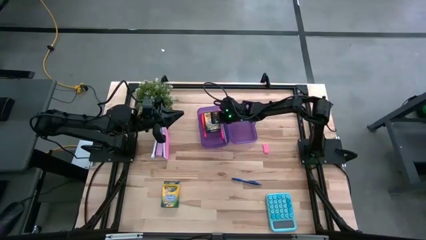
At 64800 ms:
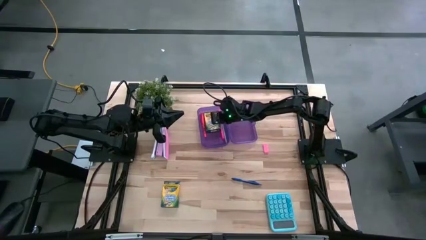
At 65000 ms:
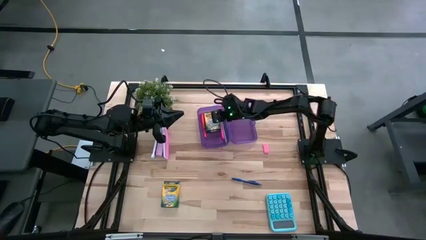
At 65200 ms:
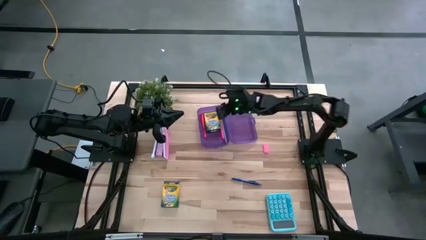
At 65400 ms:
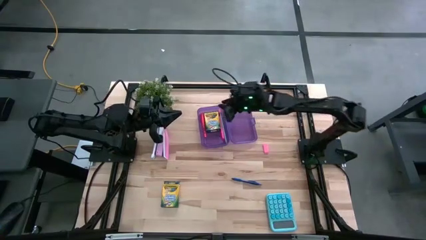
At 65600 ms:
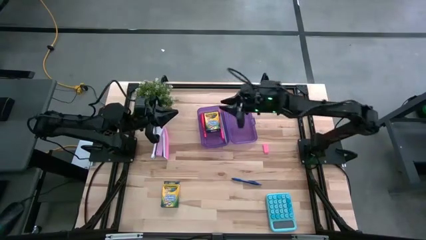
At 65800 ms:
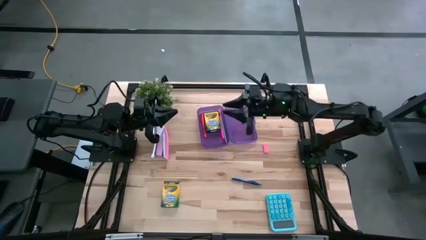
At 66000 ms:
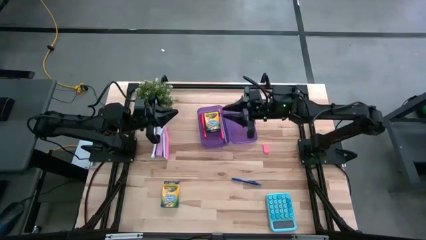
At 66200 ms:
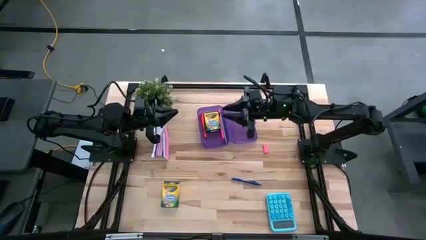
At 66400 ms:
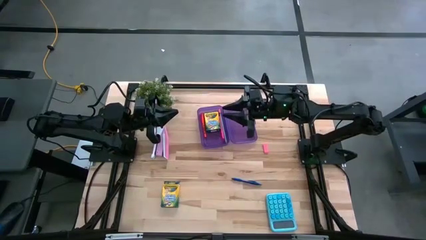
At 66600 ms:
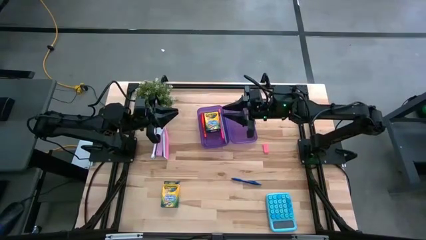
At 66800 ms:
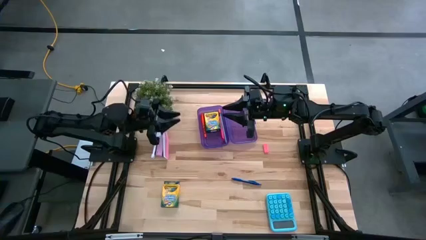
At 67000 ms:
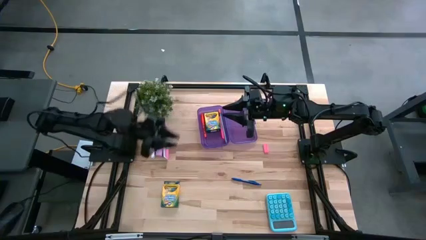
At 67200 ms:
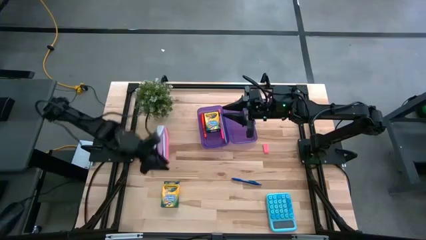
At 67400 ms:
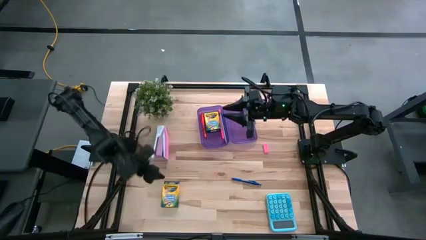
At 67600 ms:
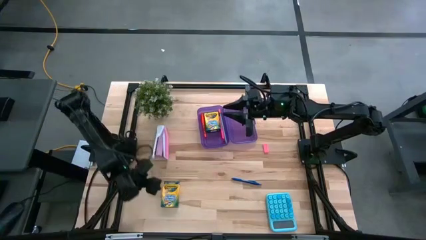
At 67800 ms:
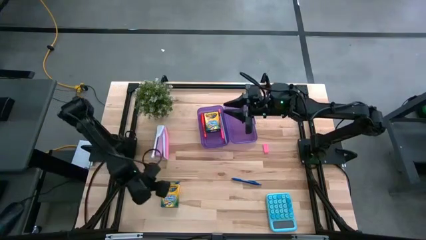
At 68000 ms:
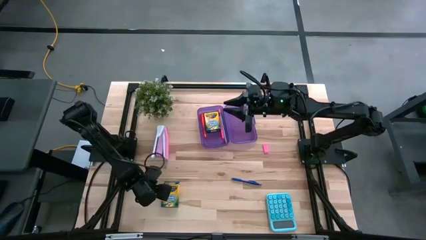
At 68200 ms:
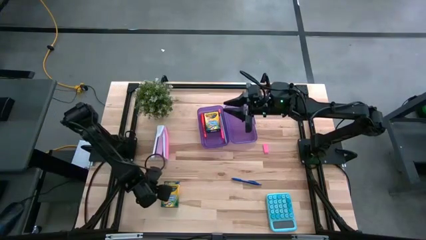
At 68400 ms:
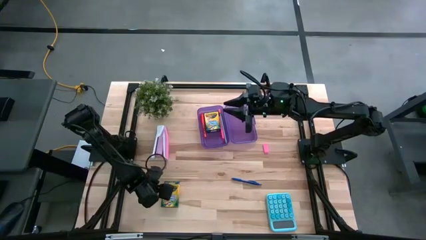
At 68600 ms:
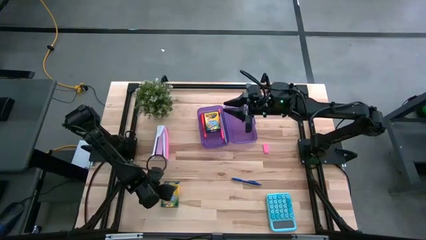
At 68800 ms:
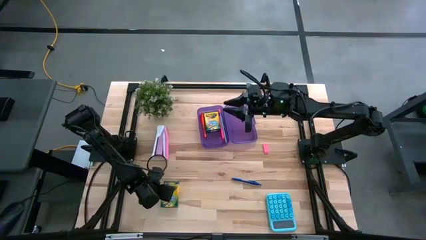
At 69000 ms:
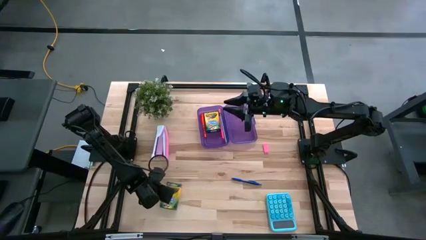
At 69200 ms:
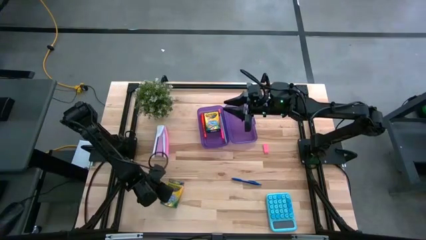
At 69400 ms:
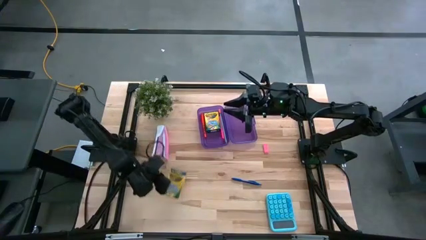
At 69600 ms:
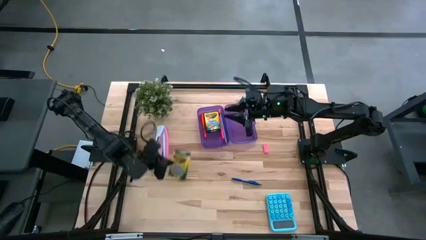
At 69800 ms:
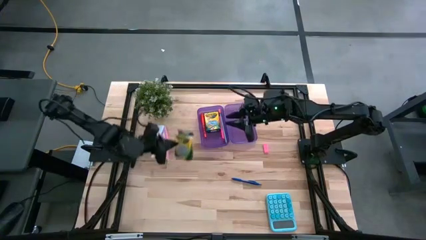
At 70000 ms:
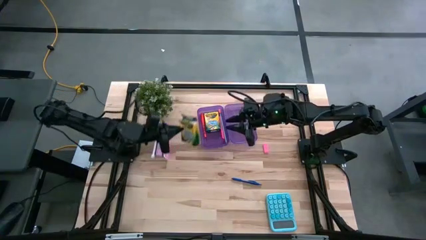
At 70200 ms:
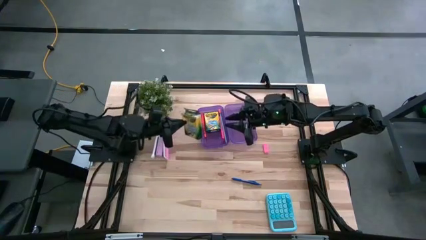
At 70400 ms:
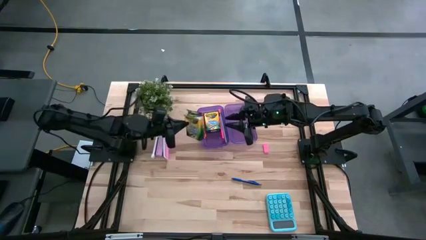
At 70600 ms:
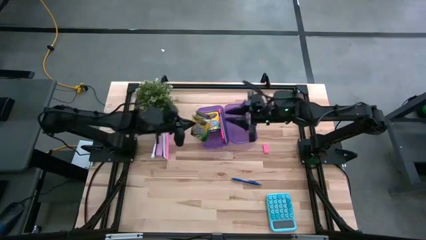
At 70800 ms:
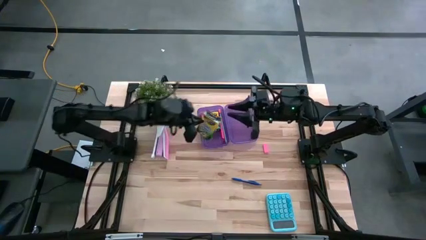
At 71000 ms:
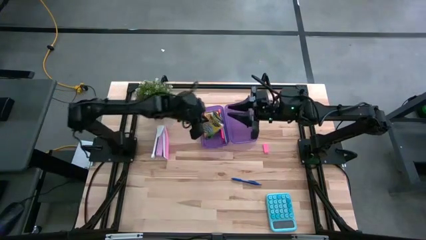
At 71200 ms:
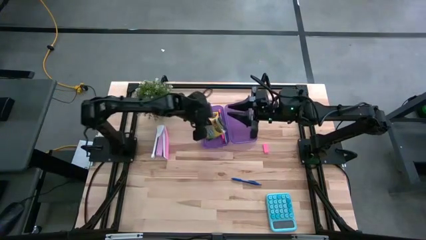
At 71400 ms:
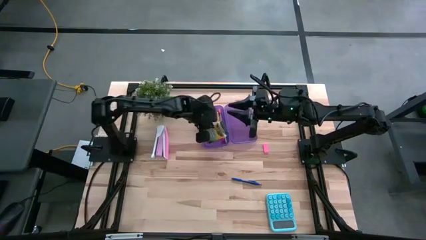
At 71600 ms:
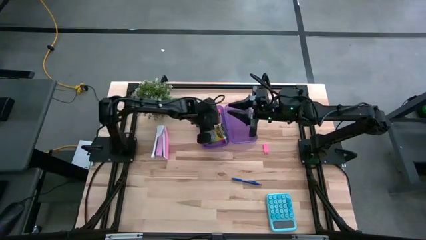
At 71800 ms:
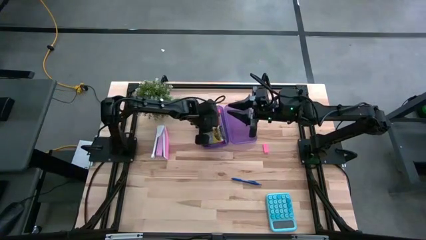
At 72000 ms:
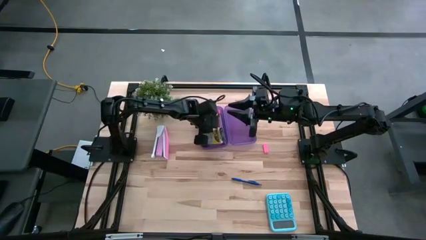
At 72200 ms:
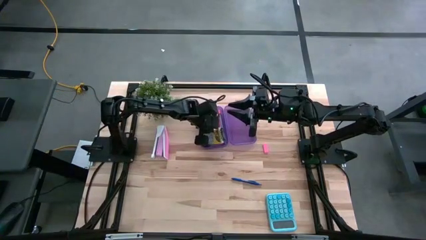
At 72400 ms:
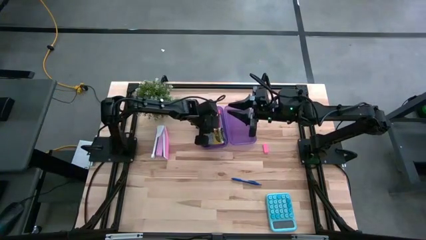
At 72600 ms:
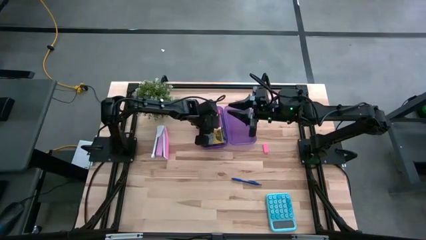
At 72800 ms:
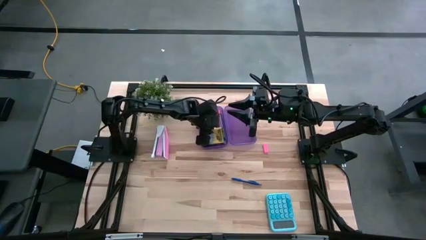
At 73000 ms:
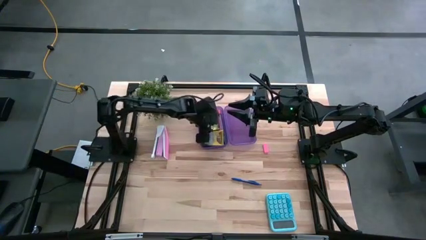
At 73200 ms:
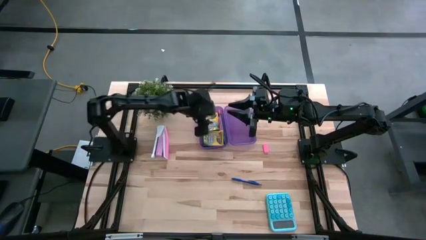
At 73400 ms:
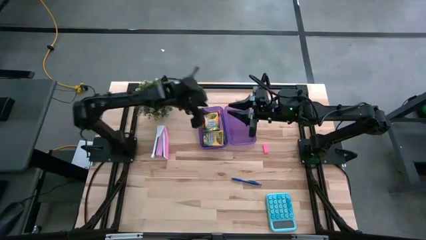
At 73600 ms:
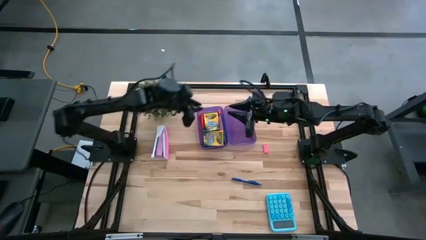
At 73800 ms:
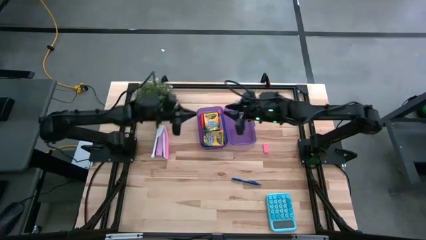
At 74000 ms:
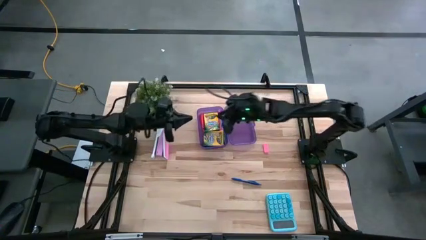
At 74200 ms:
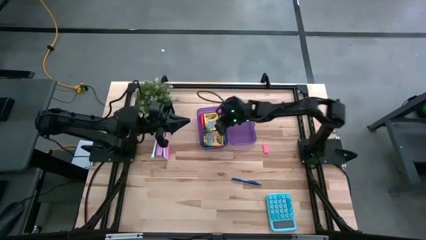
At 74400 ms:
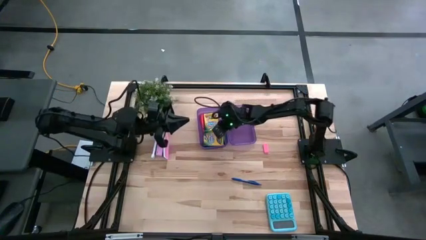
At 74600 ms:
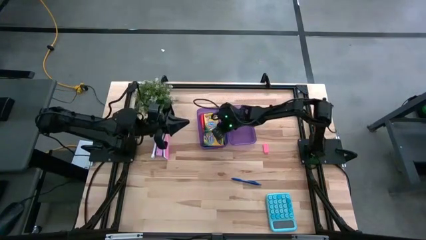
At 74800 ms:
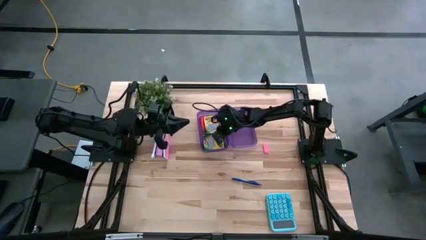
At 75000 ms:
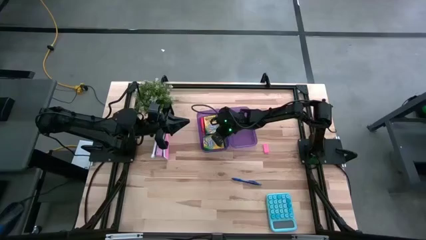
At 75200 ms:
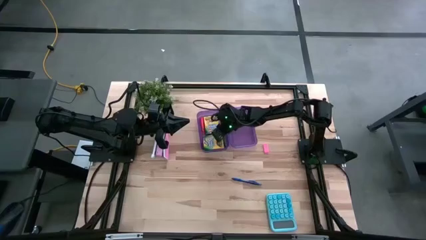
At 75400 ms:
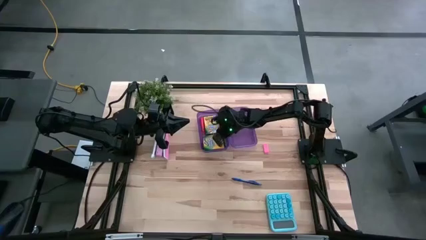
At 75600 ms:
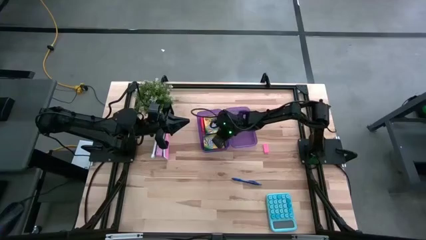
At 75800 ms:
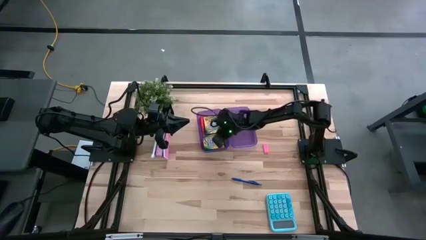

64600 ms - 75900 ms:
Task: Pick & place school supplies into a supply box
Put the box of crayons into the purple supply box
